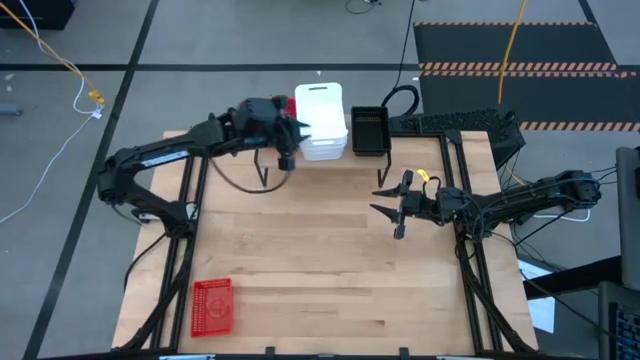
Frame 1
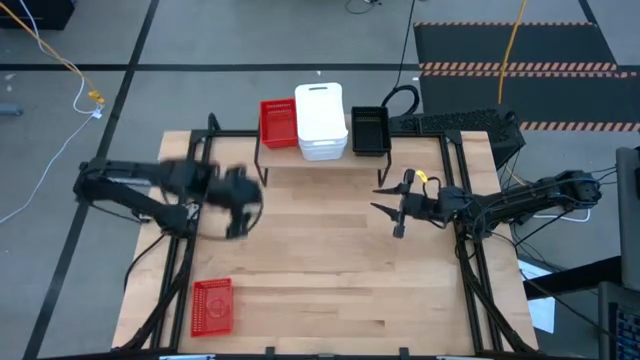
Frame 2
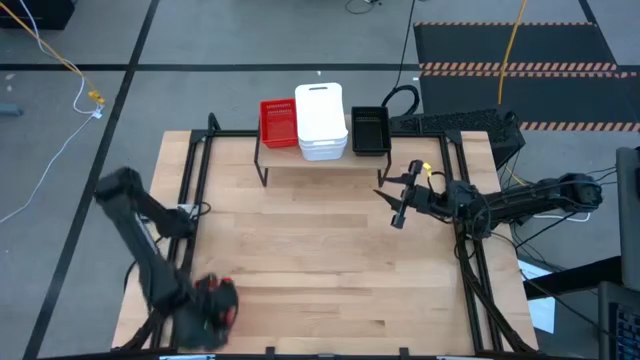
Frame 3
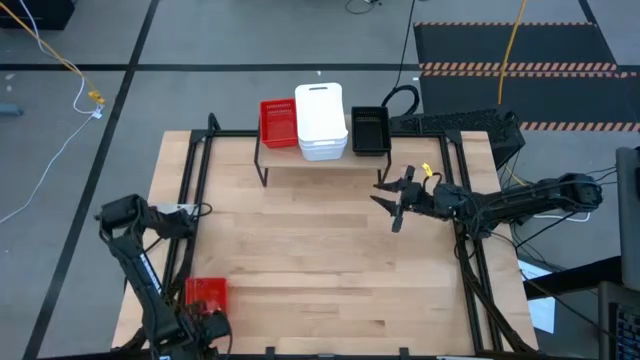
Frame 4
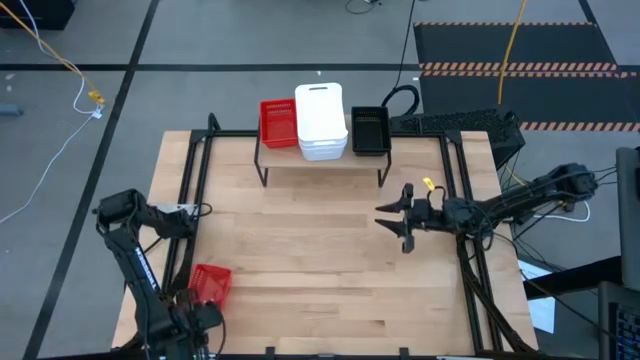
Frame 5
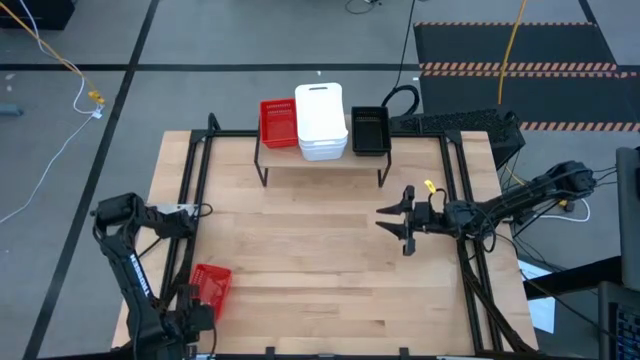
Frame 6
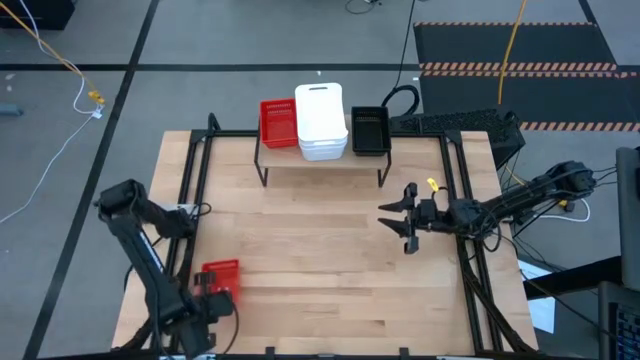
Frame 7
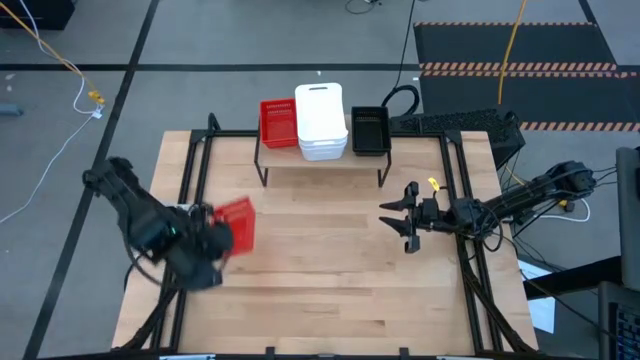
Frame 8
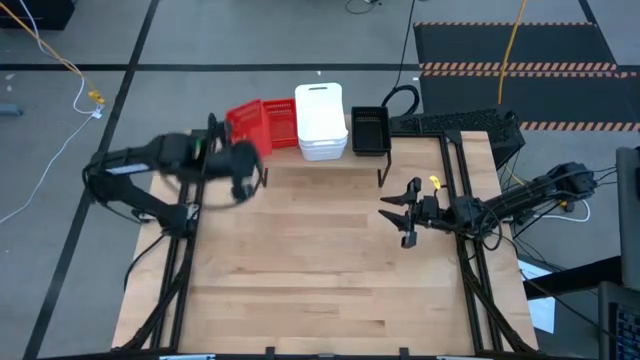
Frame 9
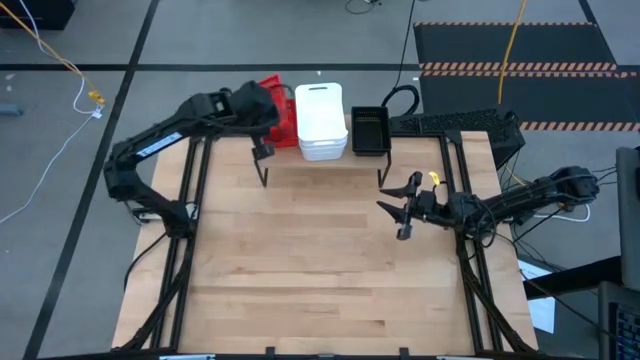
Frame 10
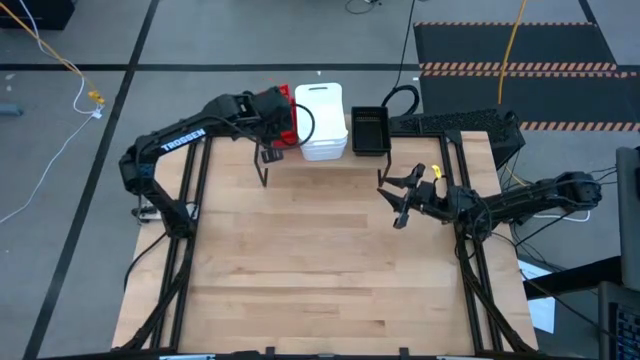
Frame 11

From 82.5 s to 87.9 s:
Task: Stack baskets on shelf by color
Stack the red bin on the stacked red bins on the shelf

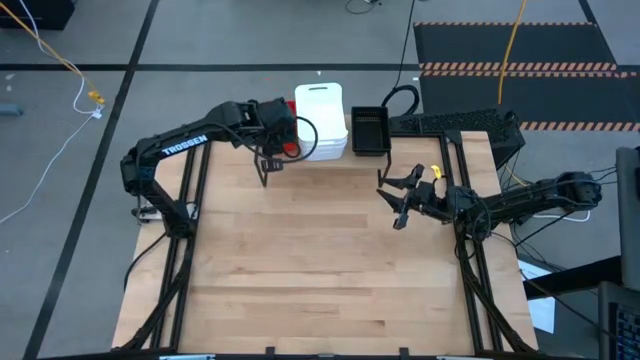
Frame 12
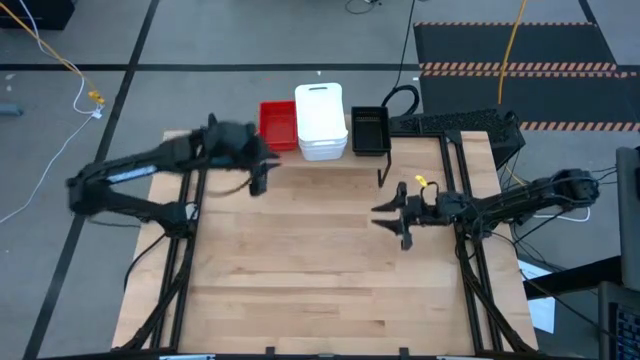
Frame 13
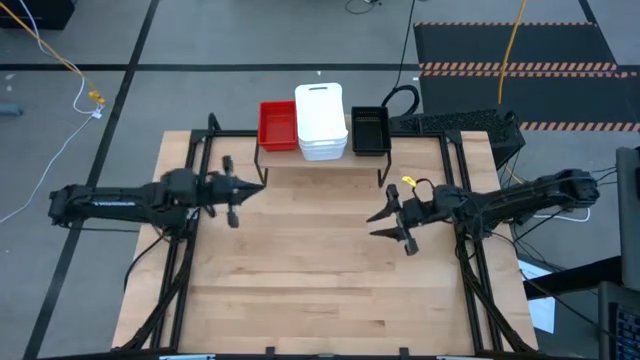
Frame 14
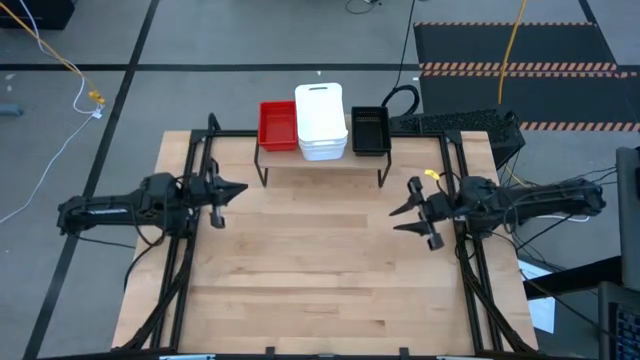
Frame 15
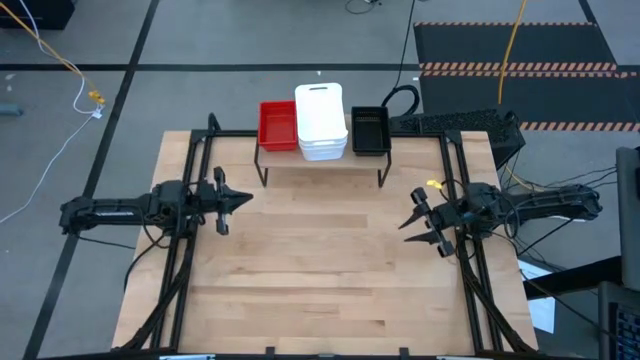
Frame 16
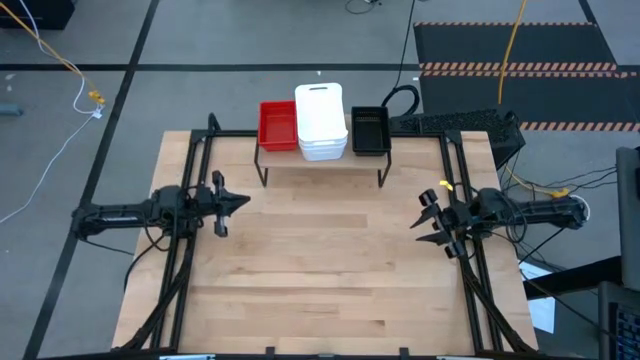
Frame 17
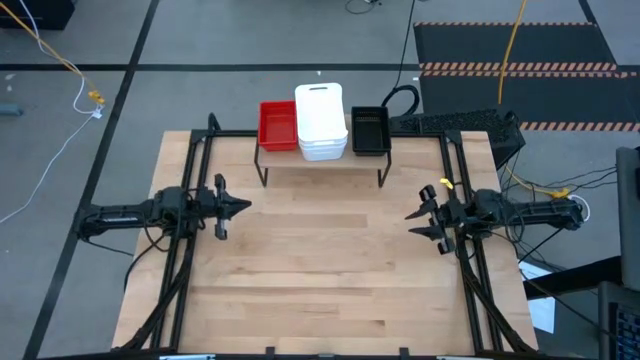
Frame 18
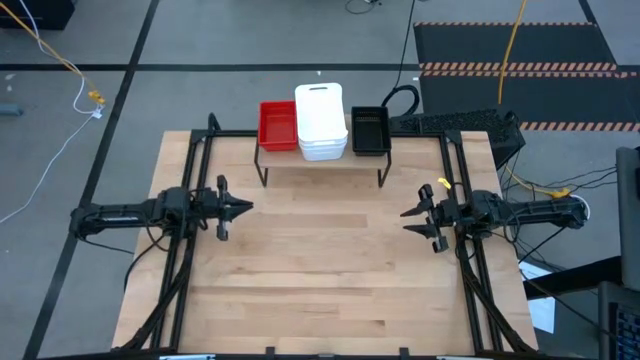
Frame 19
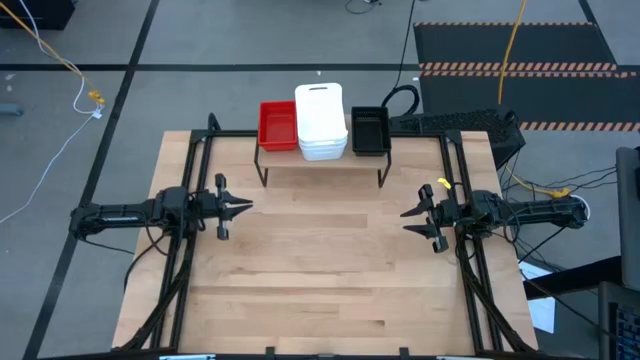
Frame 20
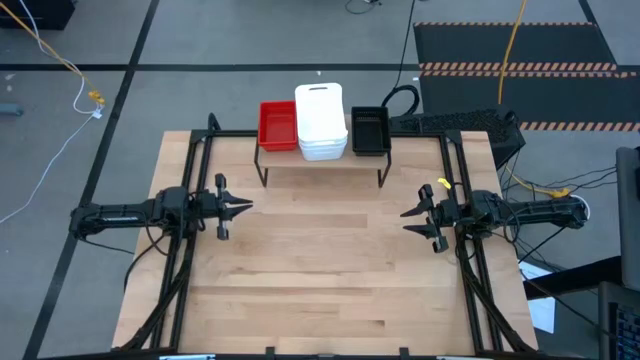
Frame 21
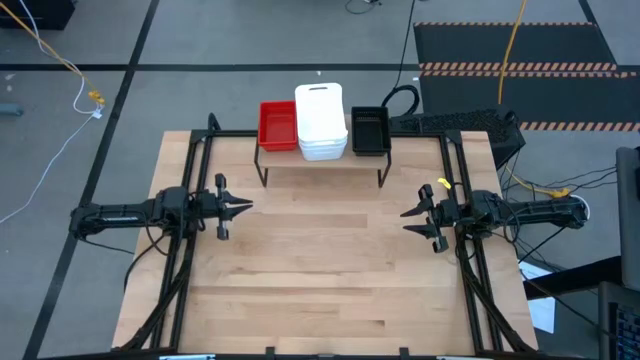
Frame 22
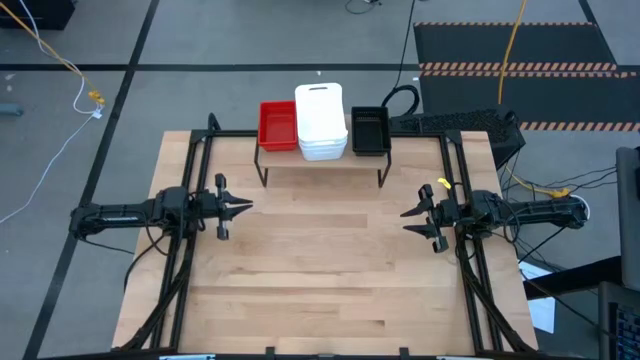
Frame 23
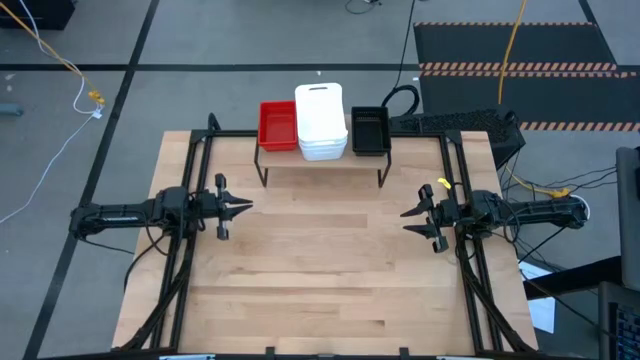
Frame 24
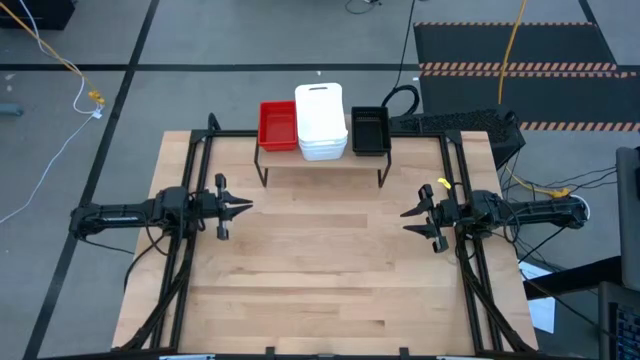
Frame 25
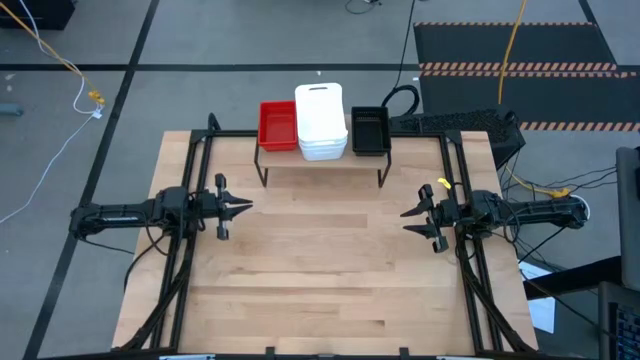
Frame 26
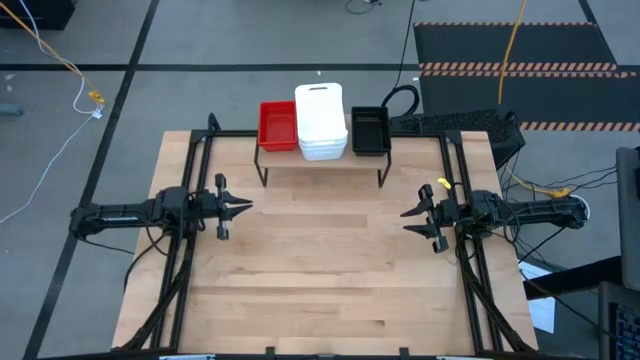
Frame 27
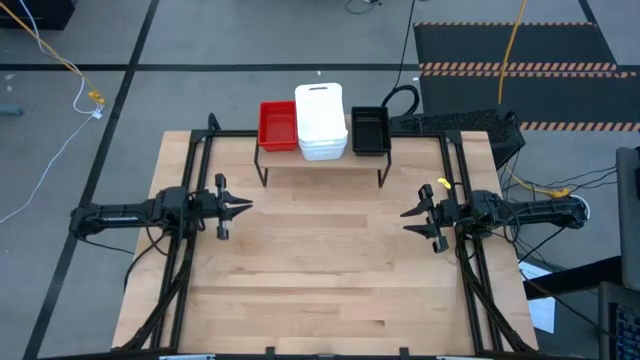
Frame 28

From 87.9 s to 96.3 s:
Return to Home Position

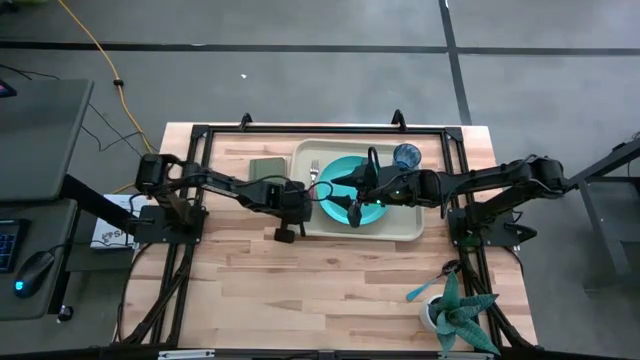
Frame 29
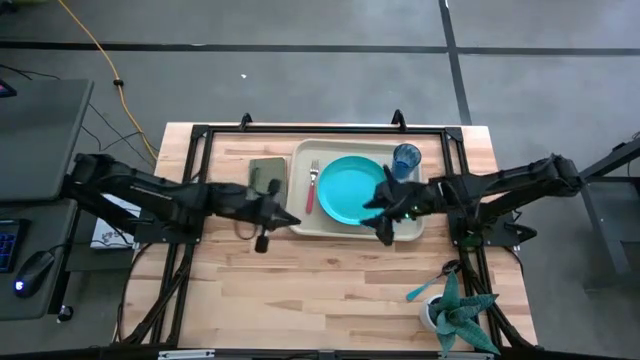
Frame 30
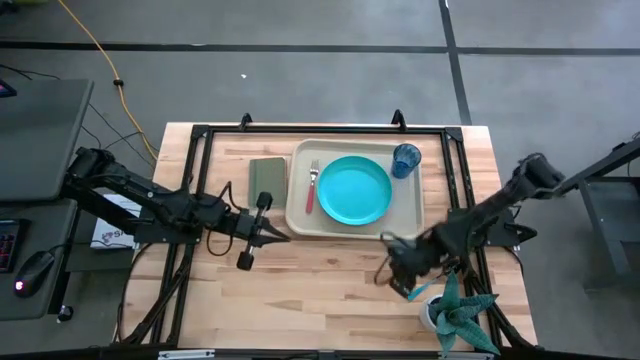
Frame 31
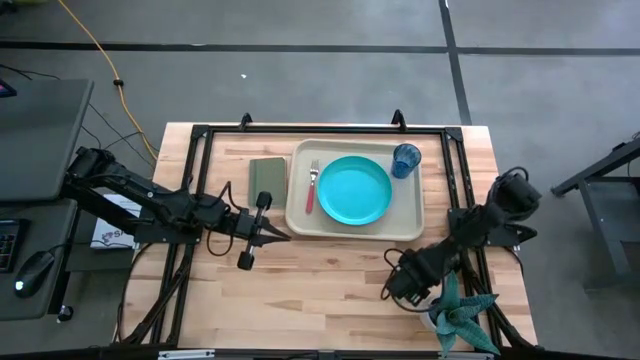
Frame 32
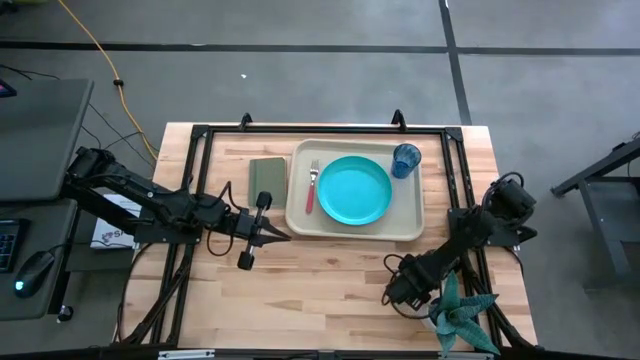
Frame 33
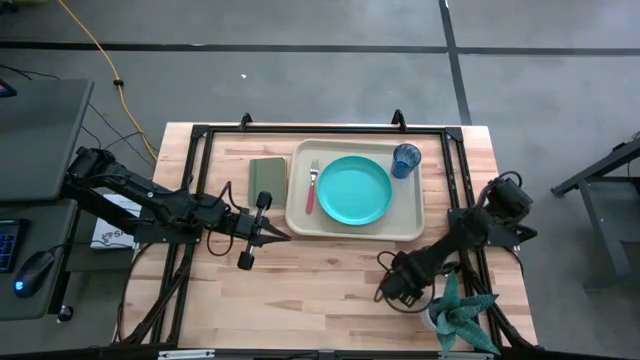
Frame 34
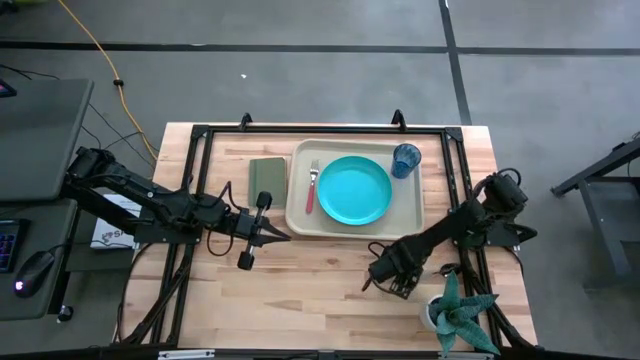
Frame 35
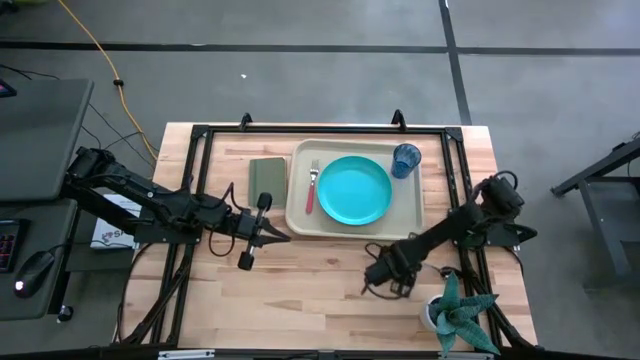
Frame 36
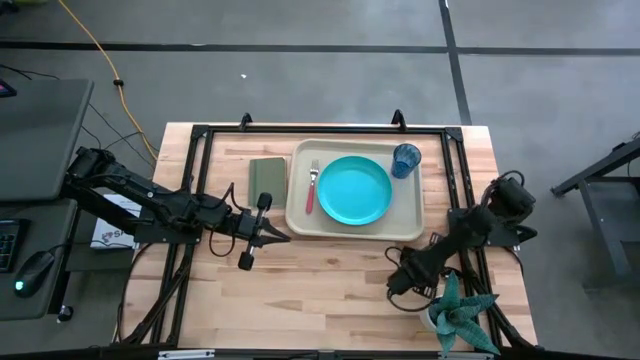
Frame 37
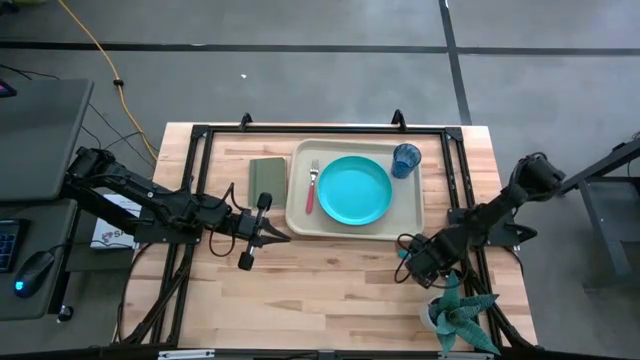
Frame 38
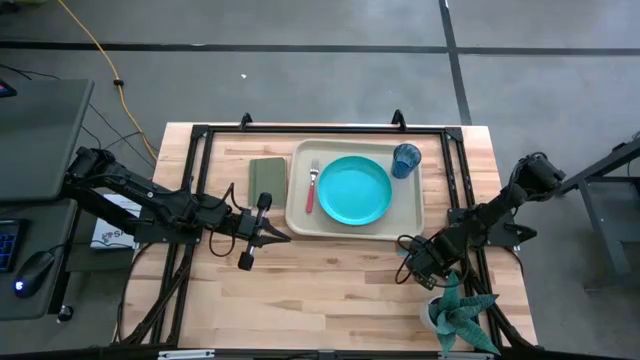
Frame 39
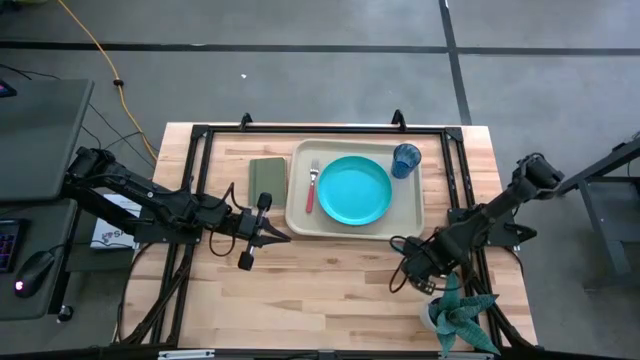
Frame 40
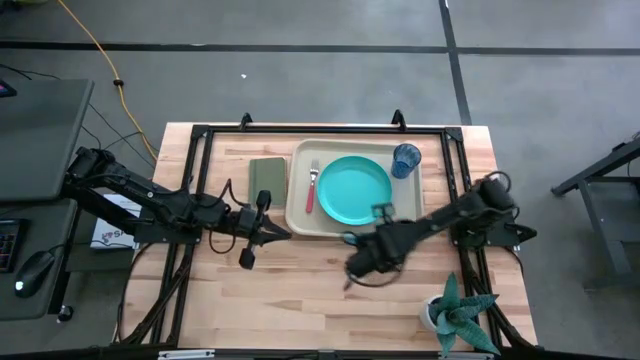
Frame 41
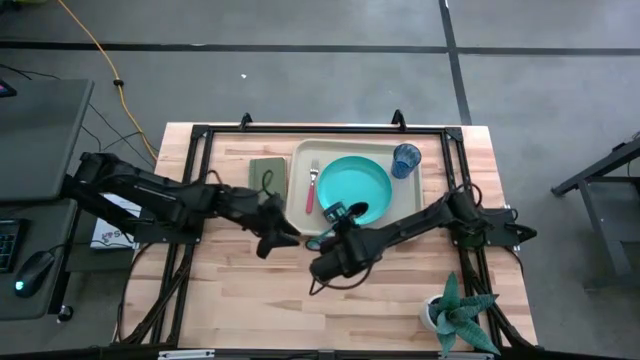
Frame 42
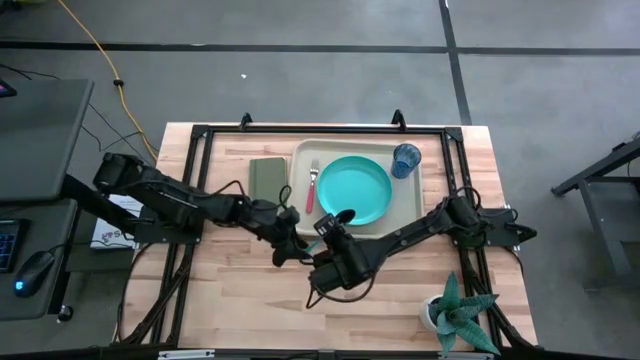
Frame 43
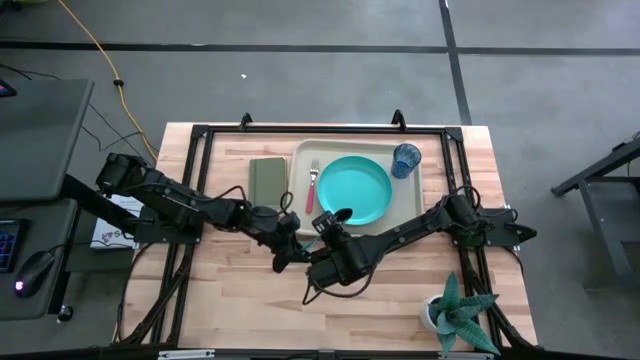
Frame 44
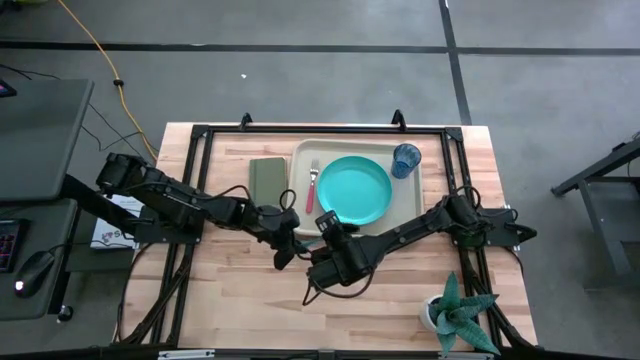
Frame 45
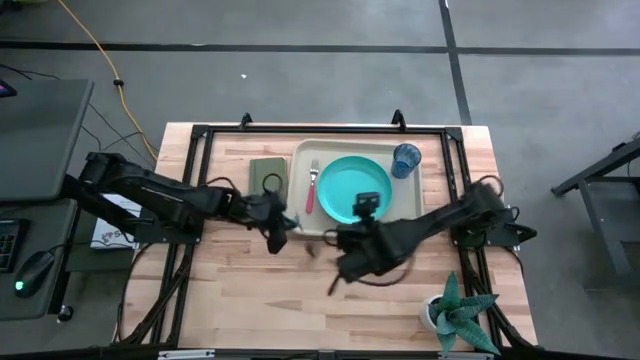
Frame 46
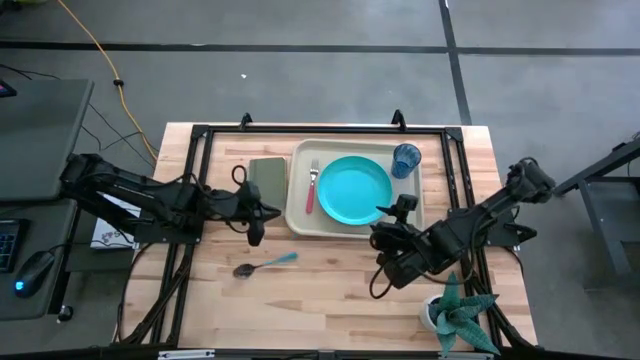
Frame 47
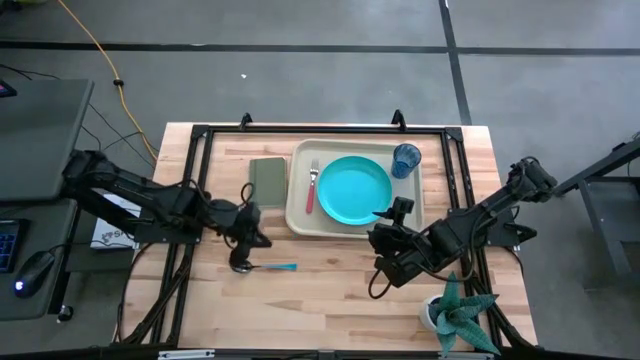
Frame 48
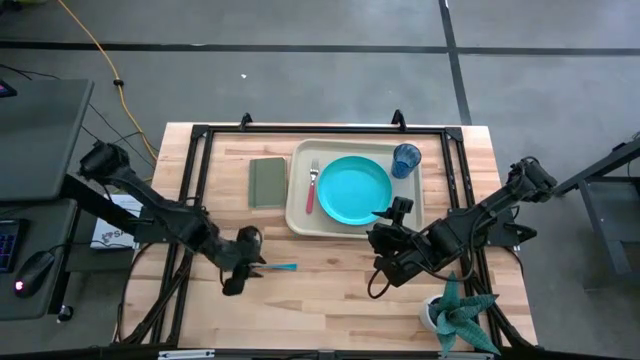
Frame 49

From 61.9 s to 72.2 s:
Task: Pick and place plate/cup/fork/spoon on tray
Put the blue spoon on the gray table tray
